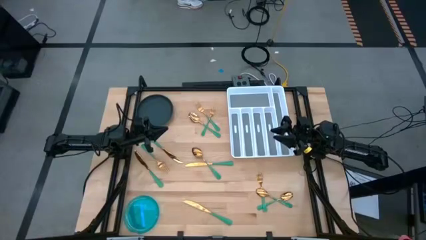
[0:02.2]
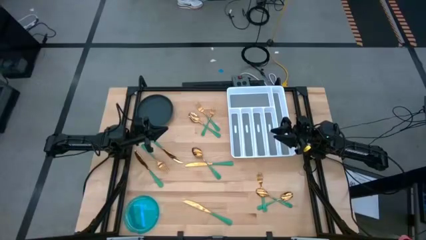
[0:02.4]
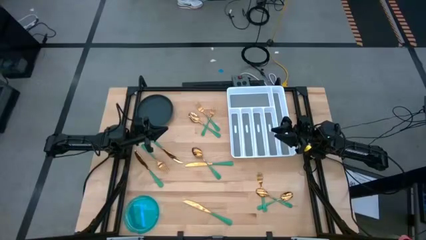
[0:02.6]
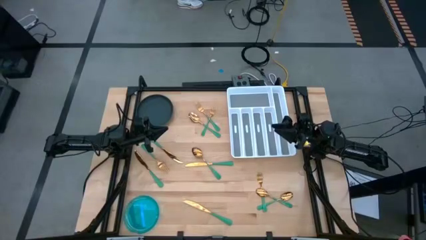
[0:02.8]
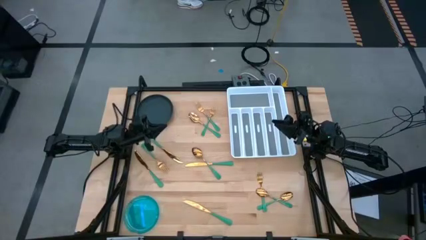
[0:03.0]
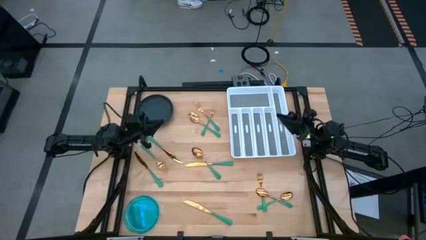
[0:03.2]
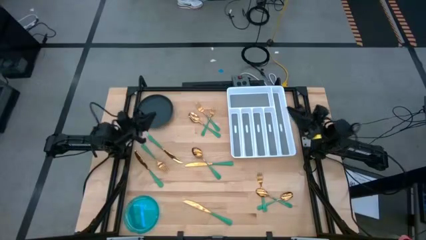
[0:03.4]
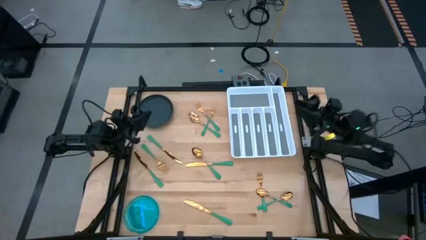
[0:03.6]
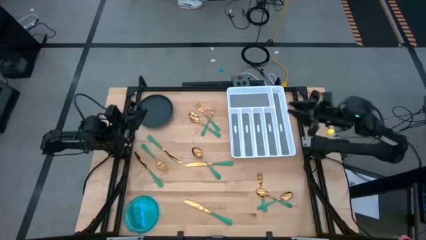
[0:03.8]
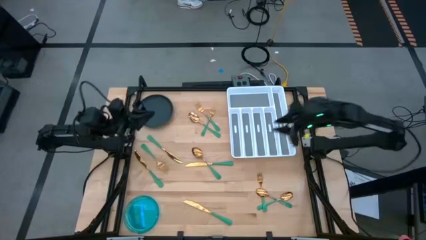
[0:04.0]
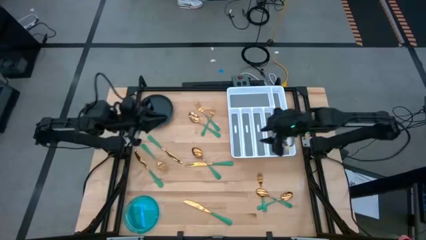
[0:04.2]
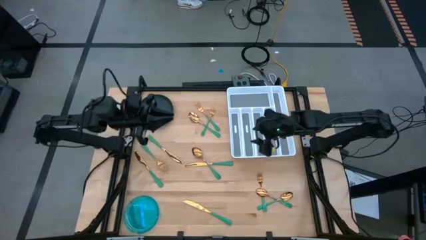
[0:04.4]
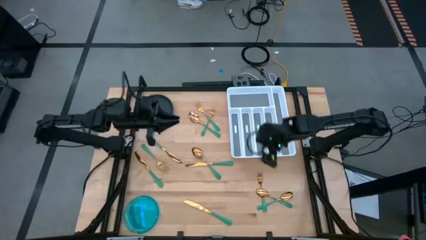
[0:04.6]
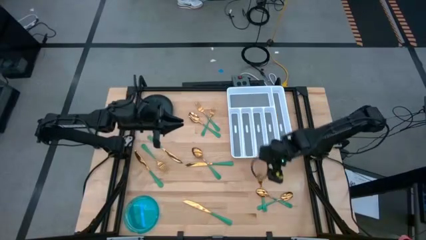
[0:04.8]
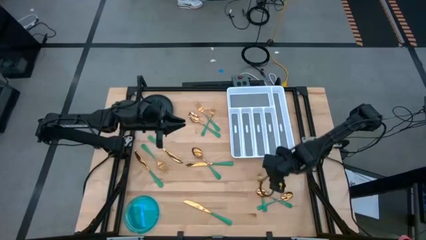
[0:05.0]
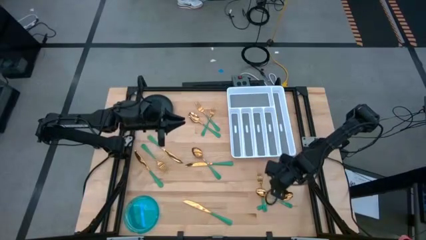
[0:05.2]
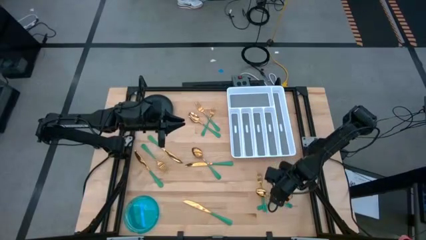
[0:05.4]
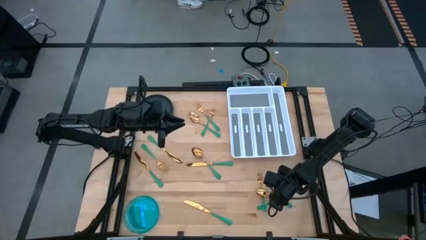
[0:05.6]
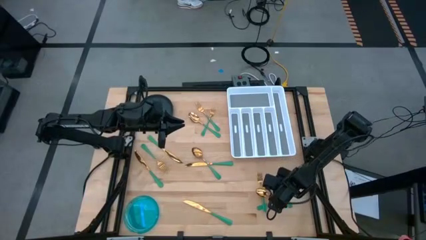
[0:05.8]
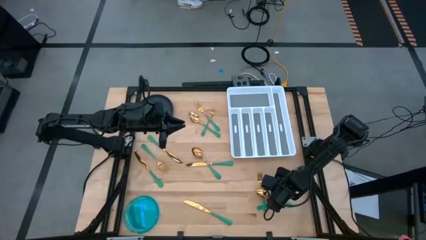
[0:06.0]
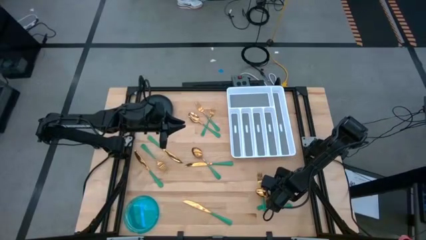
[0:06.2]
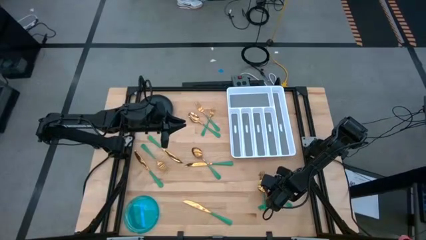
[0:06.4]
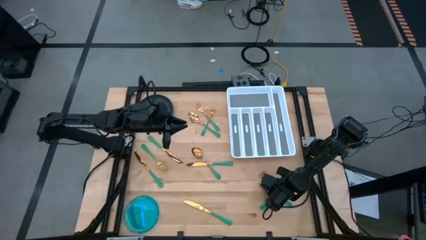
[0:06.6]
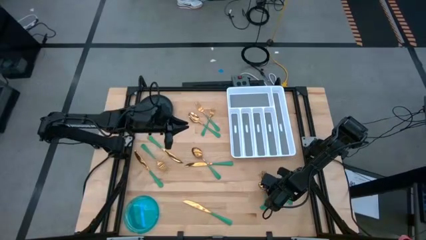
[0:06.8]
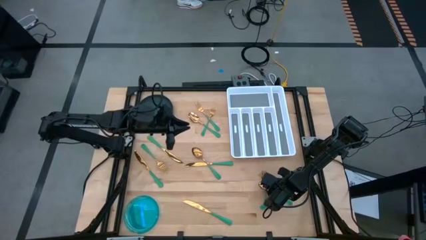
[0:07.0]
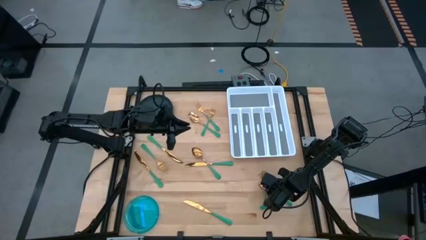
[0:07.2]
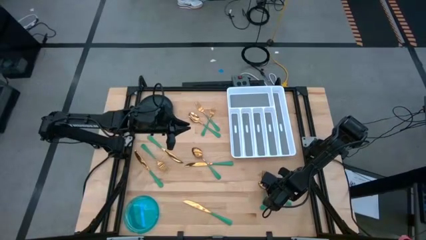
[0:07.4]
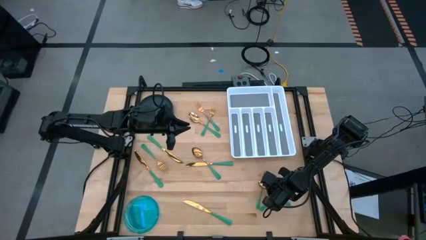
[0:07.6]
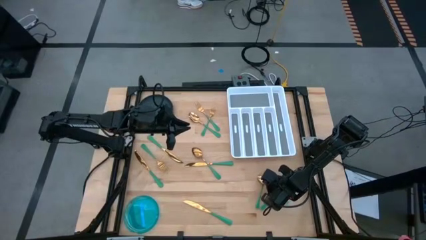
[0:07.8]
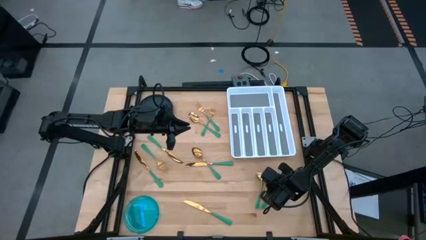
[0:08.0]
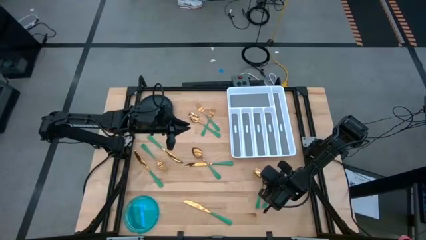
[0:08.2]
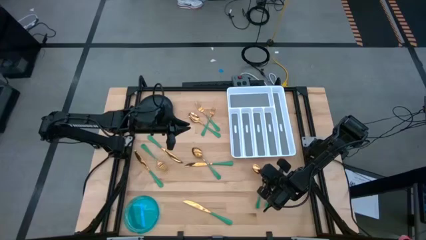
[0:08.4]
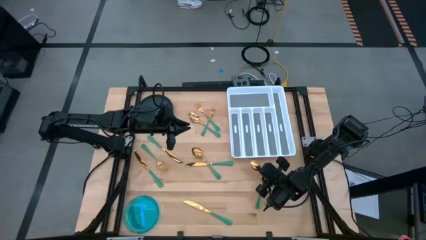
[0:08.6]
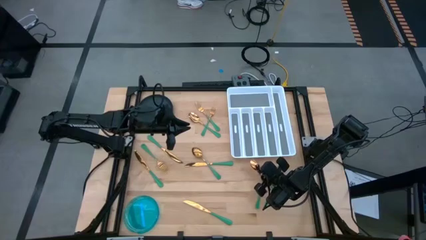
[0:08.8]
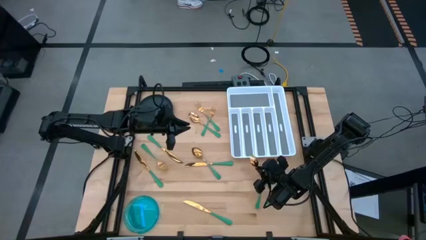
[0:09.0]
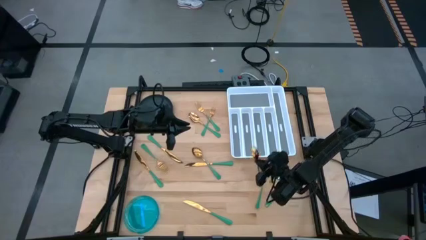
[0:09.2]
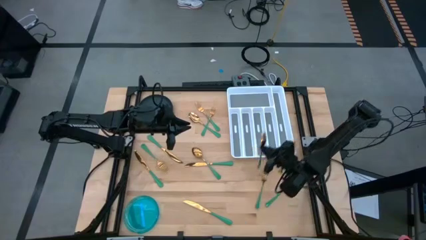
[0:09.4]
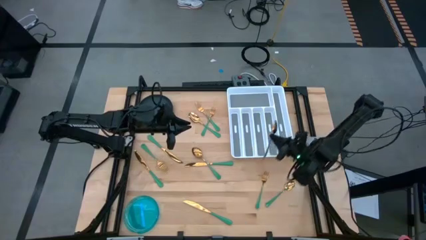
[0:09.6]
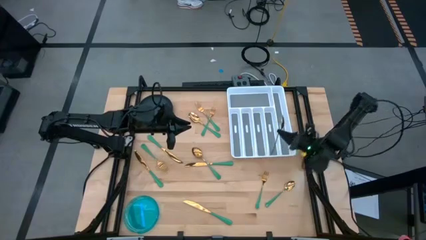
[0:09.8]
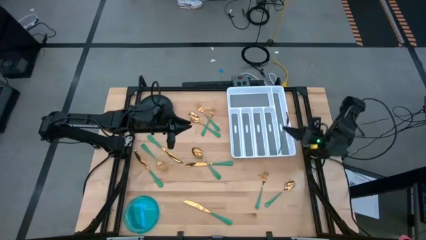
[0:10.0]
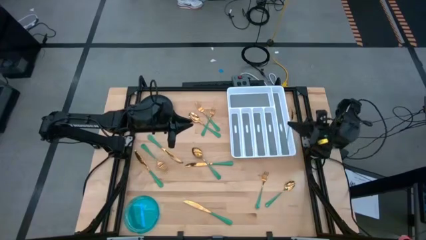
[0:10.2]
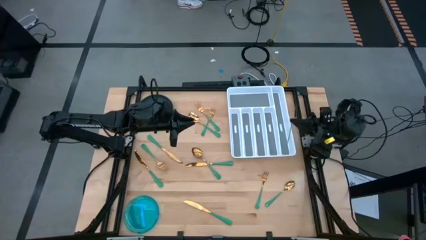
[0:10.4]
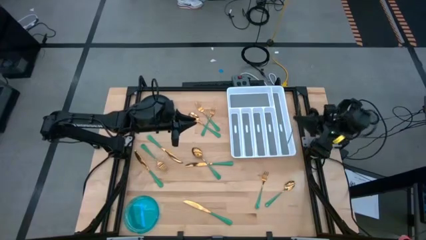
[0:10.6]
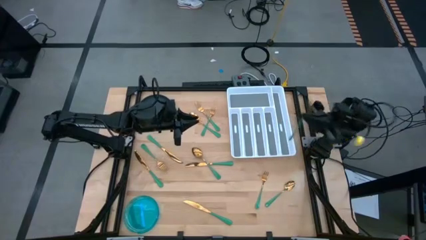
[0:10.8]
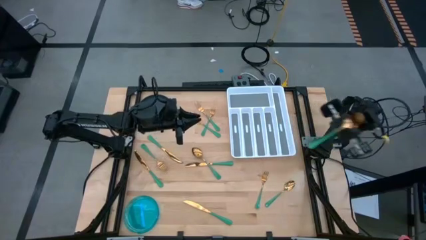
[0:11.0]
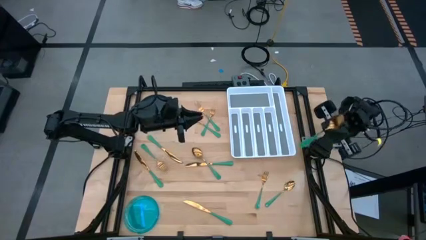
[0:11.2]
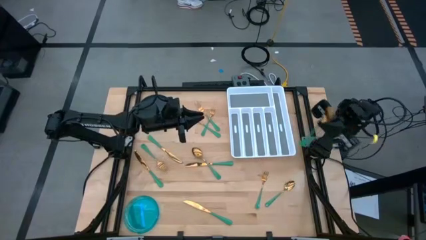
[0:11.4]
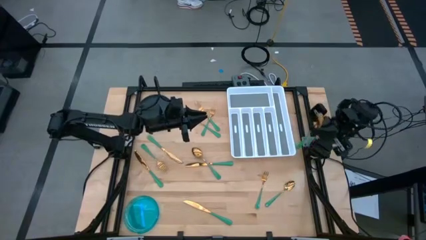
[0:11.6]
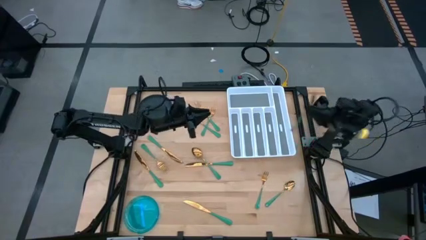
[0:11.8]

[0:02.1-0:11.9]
Task: Sort silverware
Put the green spoon into the white silverware organizer

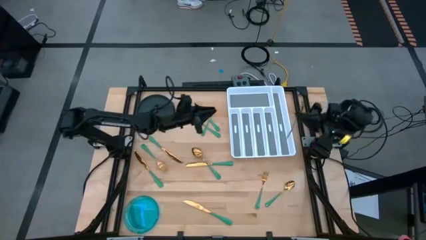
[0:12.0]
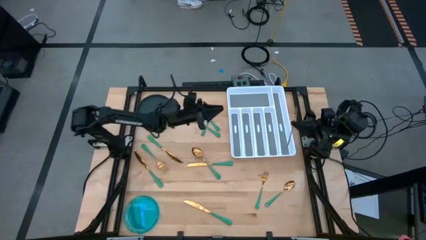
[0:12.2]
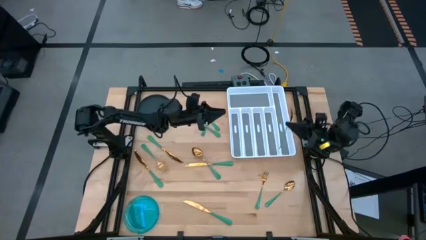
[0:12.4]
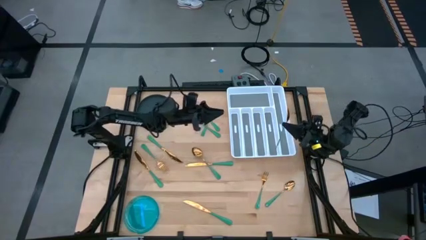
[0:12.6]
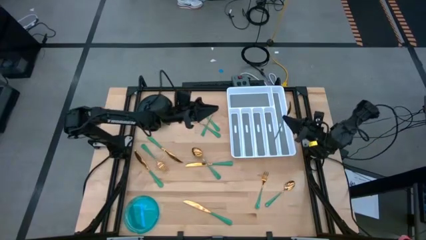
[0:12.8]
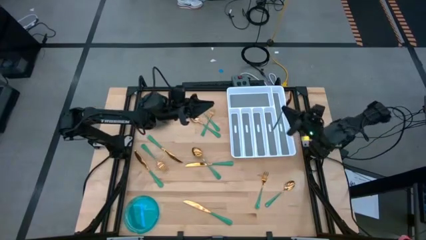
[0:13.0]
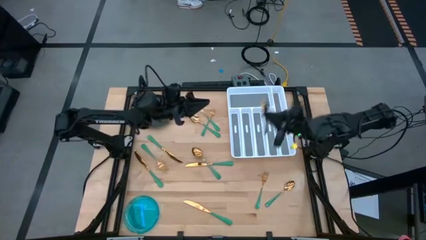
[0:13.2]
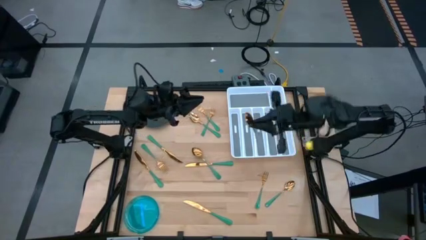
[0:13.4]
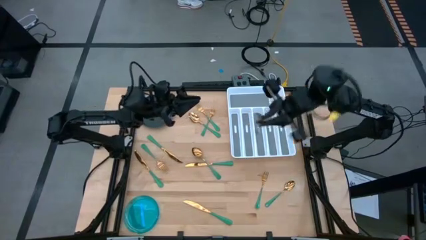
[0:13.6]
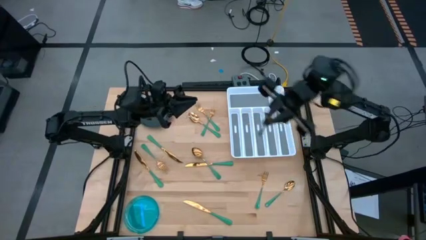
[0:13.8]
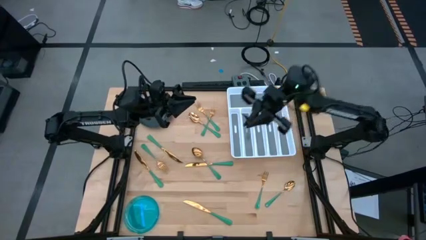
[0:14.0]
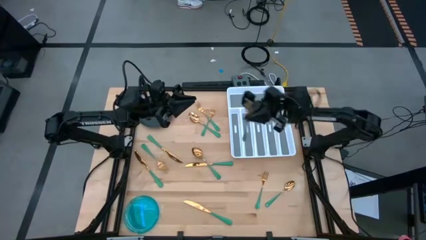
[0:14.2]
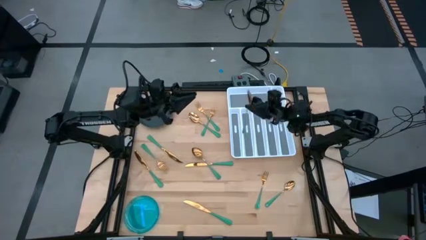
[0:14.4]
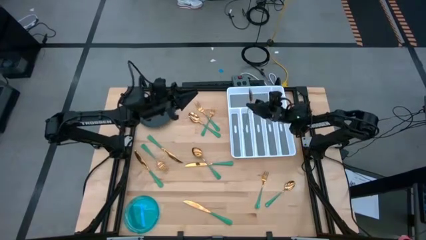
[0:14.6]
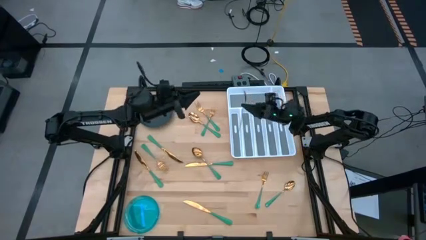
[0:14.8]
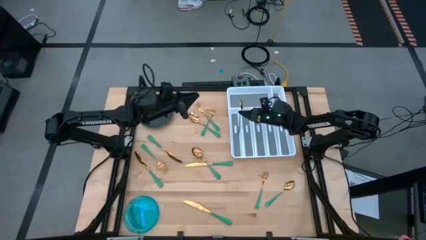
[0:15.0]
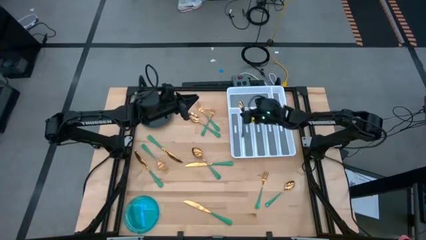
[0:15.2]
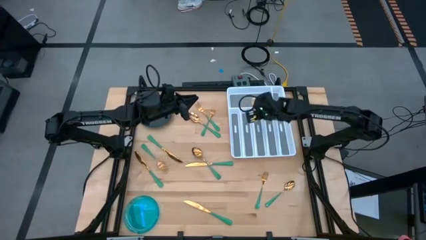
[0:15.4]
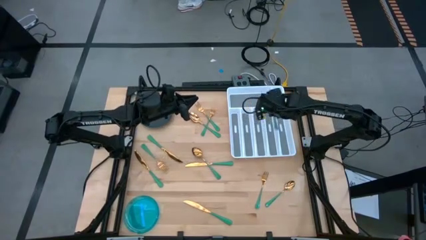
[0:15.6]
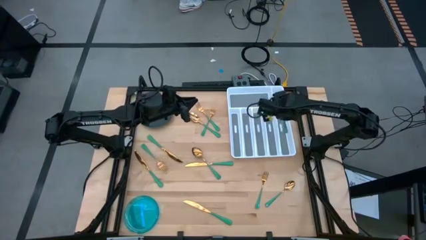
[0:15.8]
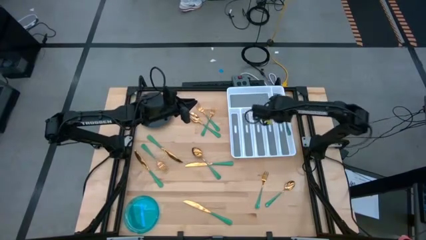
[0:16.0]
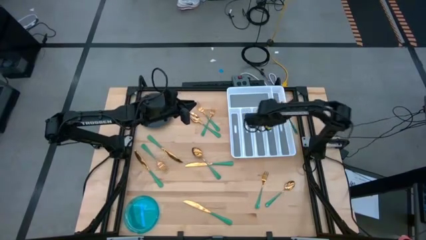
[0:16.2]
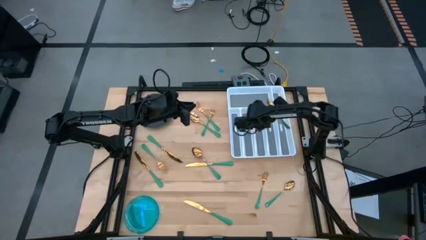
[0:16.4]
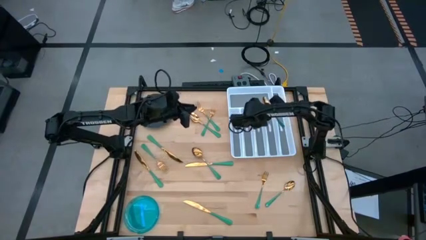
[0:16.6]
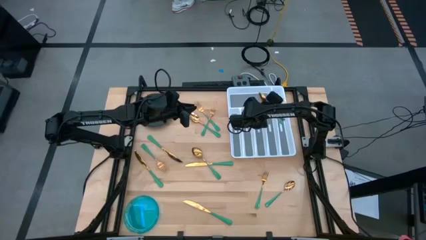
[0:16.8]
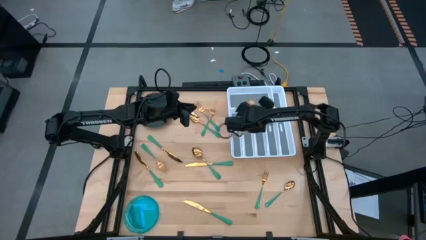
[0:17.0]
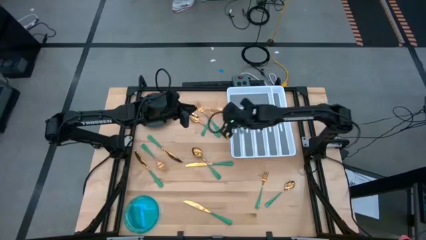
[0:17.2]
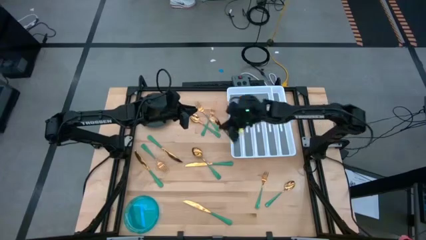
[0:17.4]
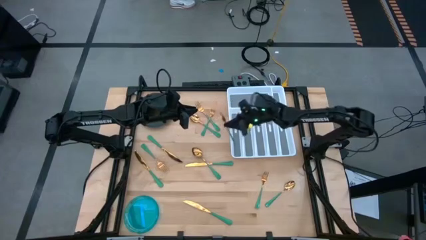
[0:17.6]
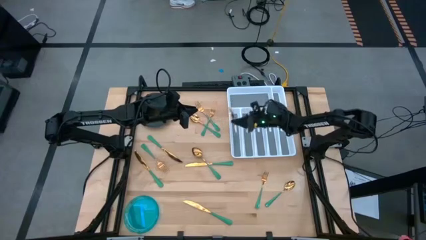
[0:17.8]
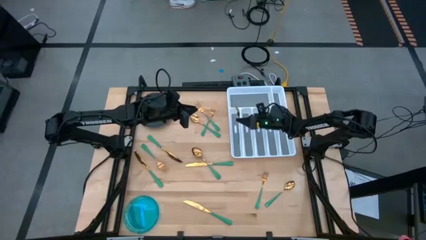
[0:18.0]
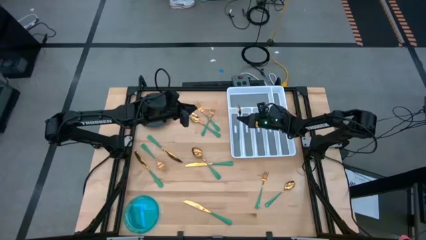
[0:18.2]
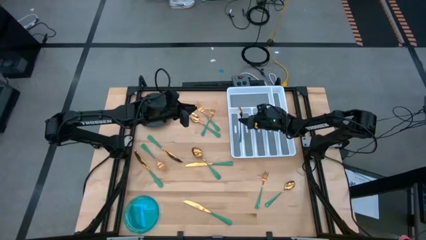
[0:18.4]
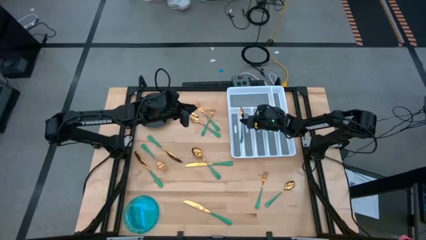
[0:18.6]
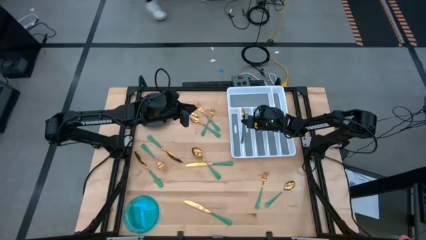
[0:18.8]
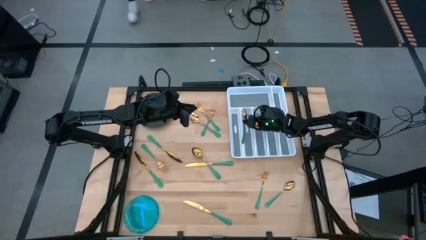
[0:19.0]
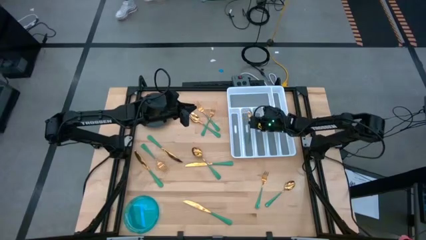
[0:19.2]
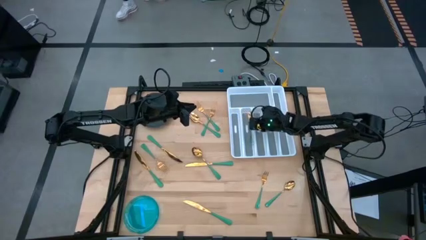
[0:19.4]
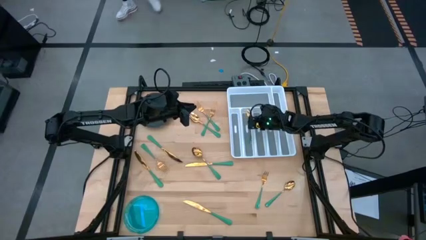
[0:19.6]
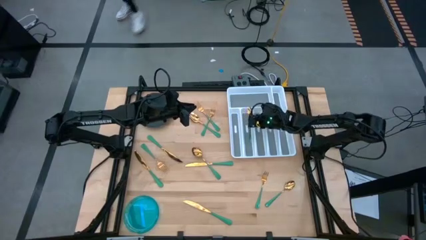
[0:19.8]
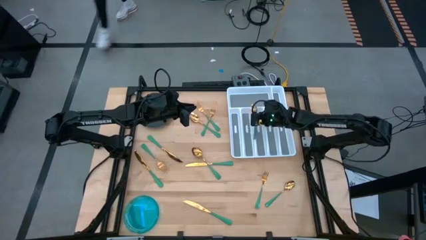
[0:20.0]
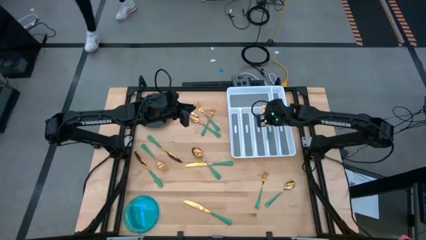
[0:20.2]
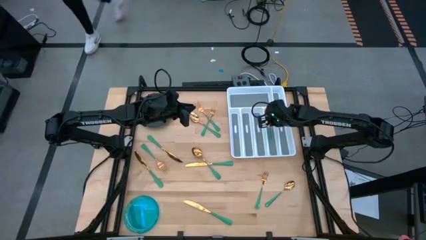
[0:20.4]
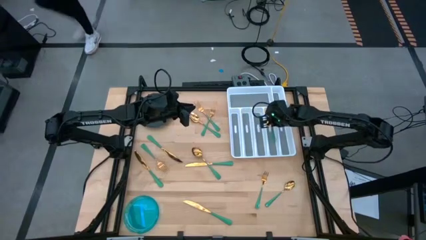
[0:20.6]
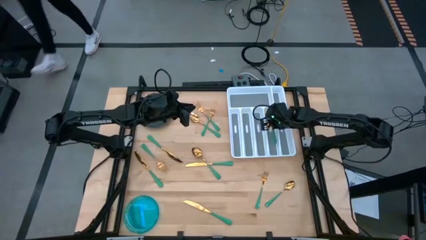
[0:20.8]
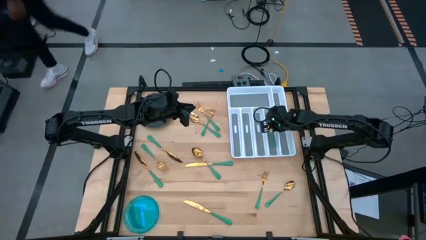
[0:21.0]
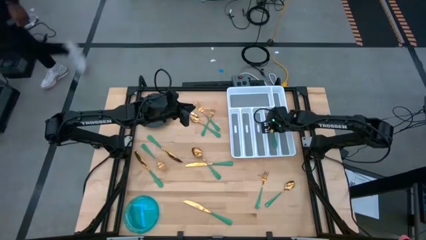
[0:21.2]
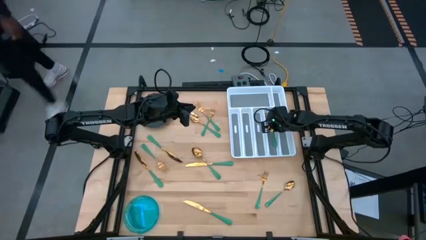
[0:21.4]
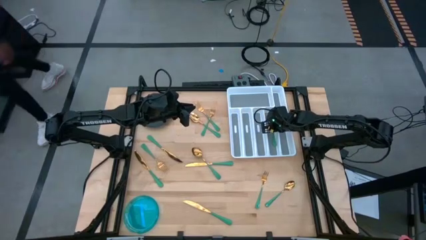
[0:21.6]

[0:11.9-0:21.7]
Put the green spoon into the white silverware organizer
